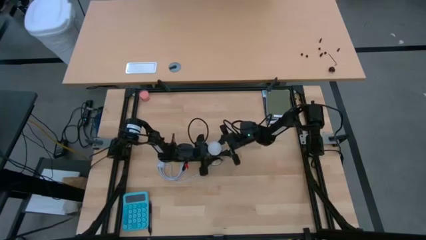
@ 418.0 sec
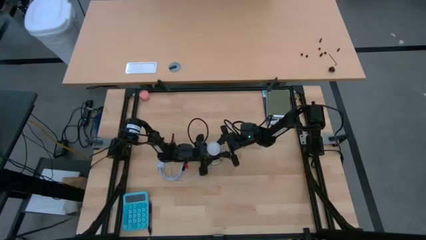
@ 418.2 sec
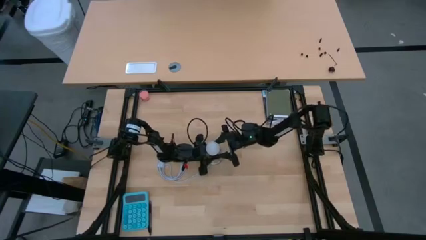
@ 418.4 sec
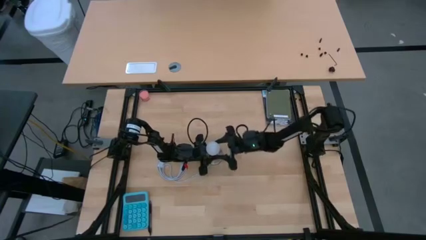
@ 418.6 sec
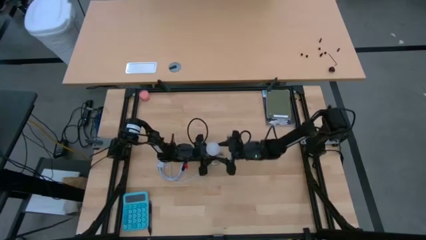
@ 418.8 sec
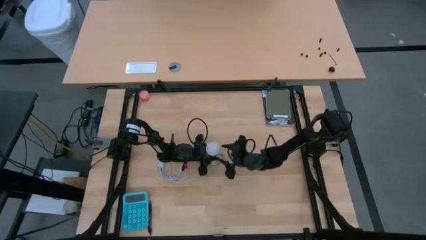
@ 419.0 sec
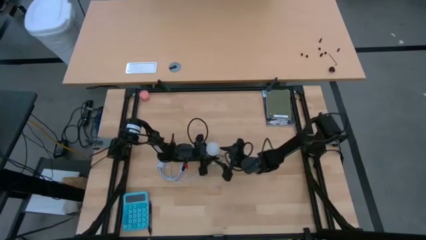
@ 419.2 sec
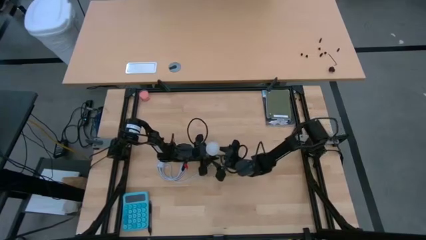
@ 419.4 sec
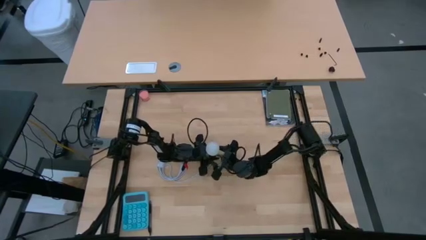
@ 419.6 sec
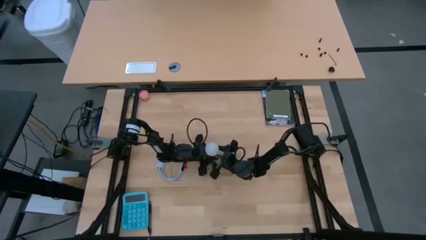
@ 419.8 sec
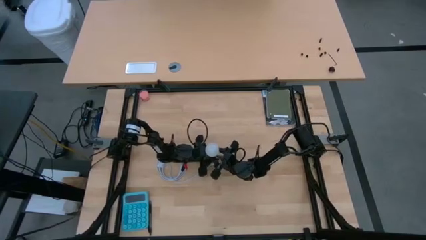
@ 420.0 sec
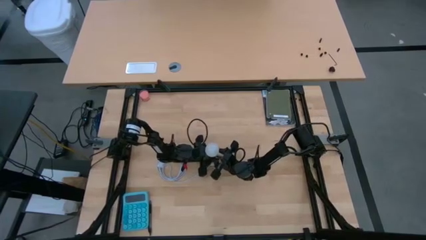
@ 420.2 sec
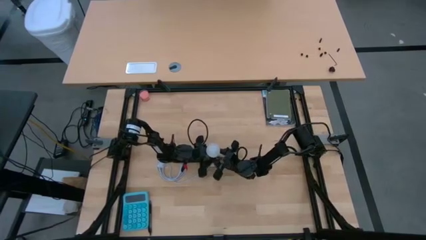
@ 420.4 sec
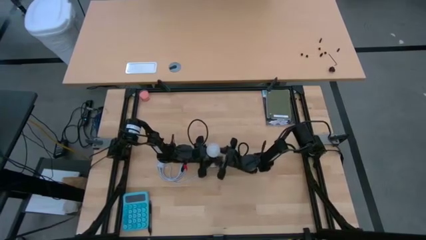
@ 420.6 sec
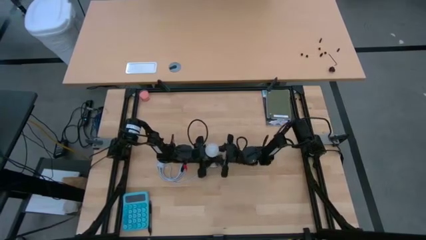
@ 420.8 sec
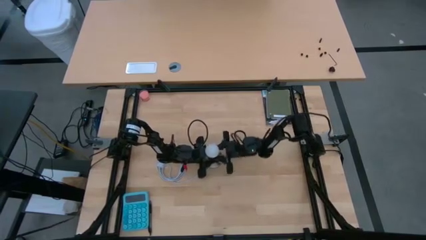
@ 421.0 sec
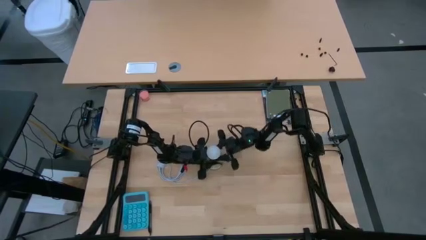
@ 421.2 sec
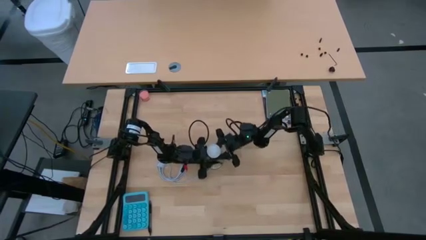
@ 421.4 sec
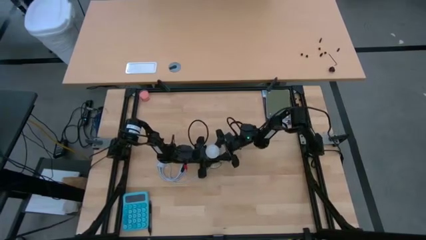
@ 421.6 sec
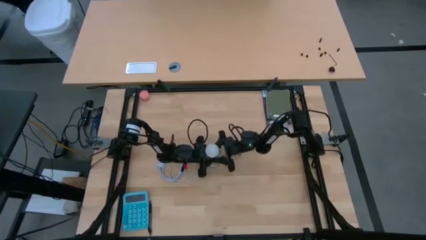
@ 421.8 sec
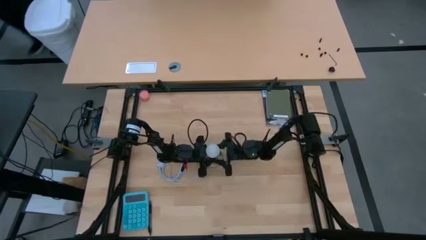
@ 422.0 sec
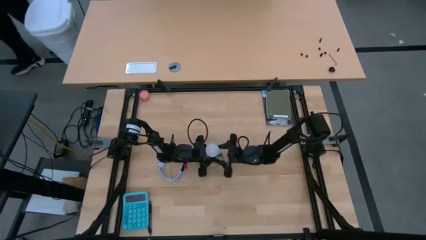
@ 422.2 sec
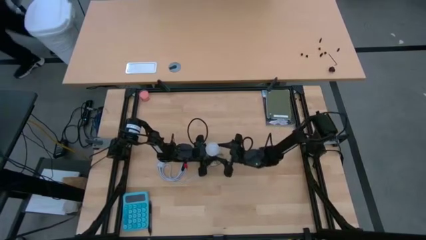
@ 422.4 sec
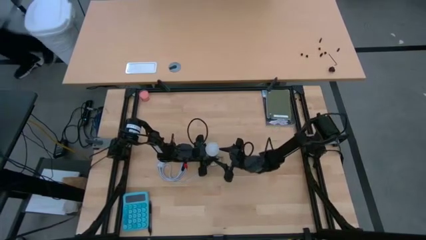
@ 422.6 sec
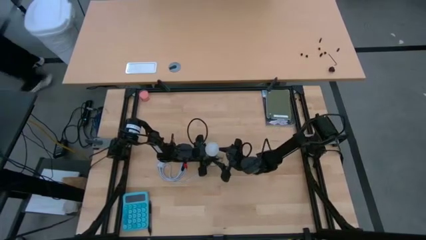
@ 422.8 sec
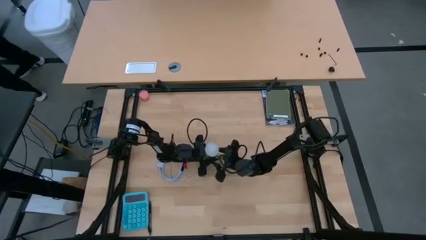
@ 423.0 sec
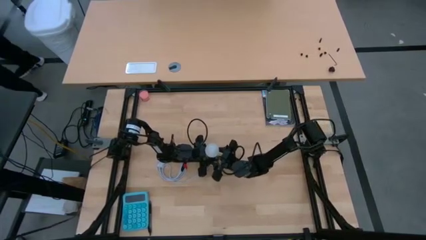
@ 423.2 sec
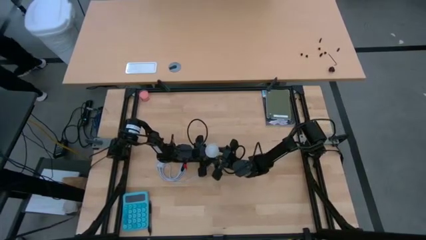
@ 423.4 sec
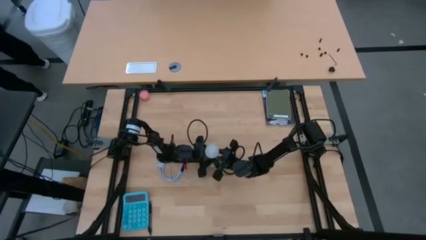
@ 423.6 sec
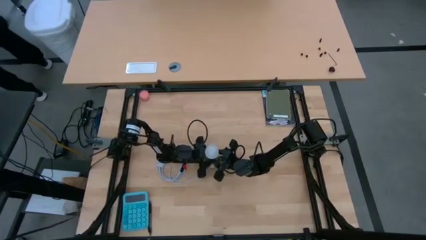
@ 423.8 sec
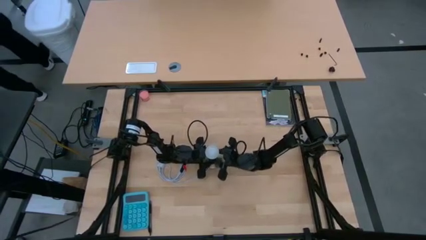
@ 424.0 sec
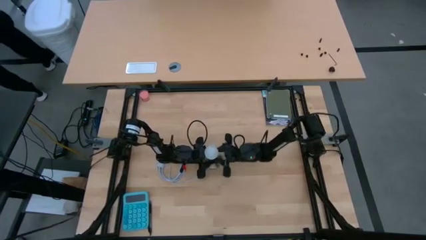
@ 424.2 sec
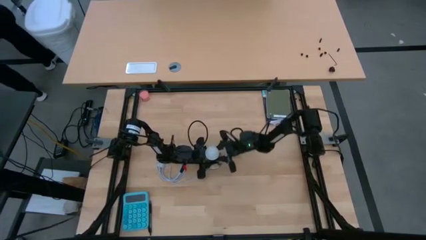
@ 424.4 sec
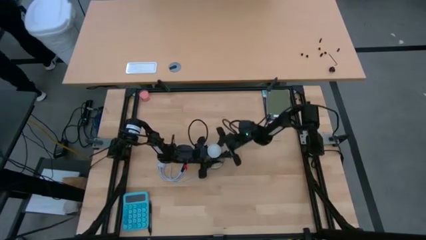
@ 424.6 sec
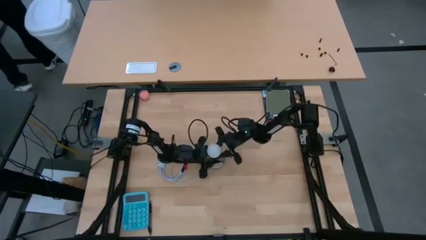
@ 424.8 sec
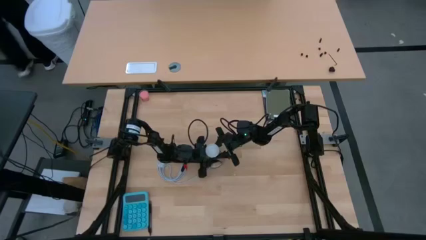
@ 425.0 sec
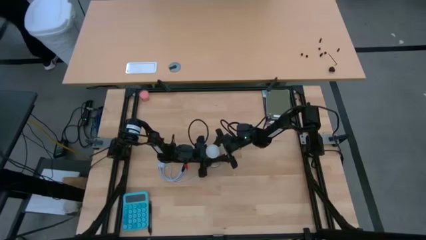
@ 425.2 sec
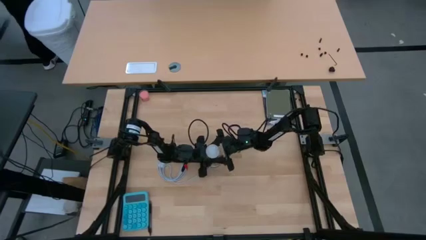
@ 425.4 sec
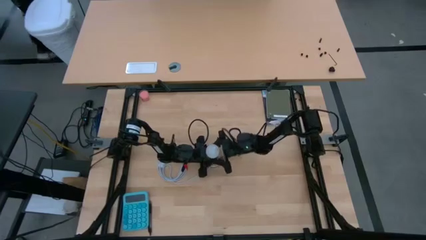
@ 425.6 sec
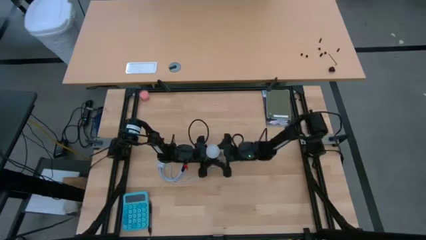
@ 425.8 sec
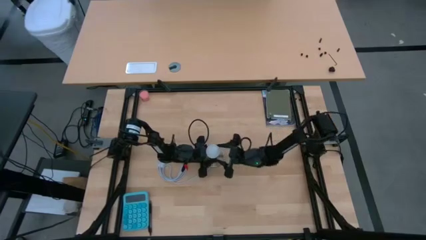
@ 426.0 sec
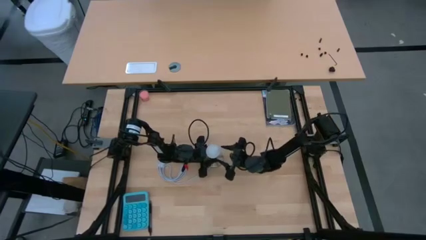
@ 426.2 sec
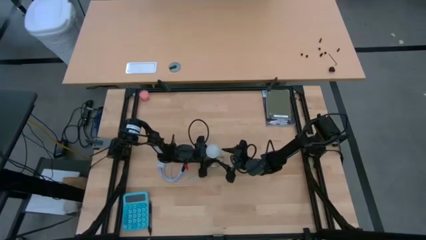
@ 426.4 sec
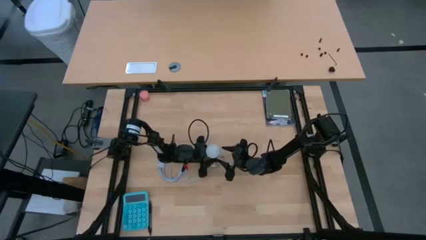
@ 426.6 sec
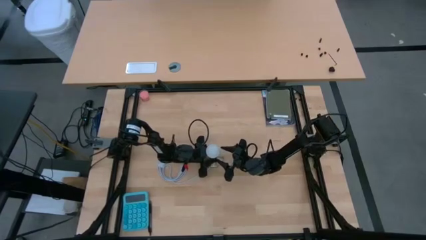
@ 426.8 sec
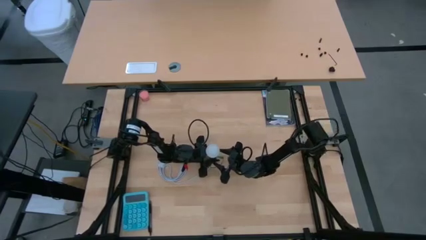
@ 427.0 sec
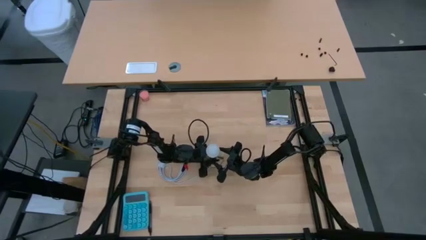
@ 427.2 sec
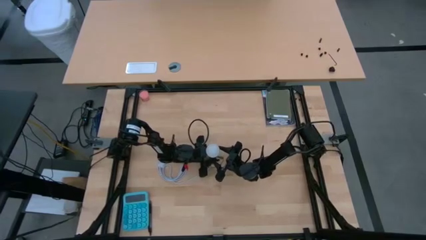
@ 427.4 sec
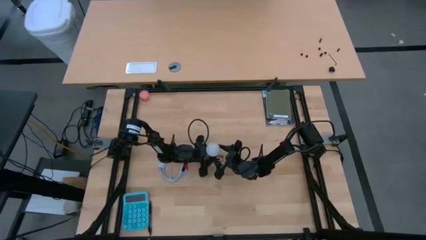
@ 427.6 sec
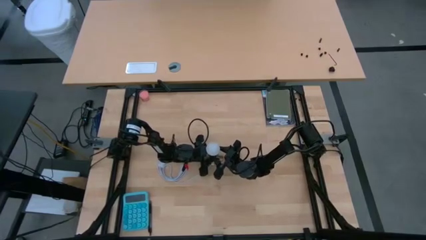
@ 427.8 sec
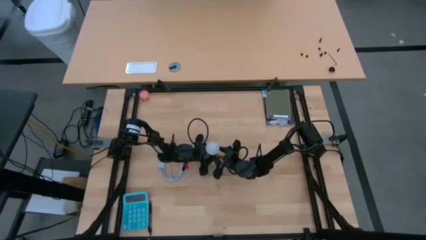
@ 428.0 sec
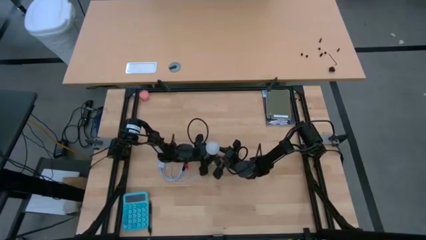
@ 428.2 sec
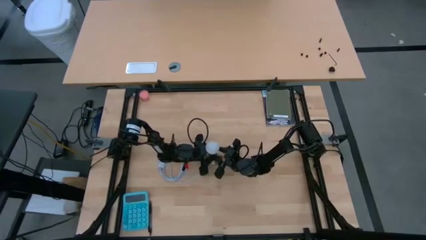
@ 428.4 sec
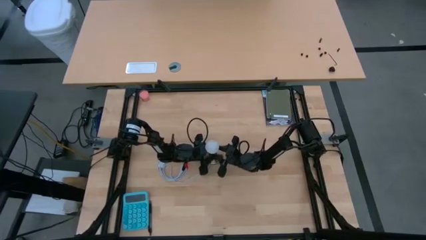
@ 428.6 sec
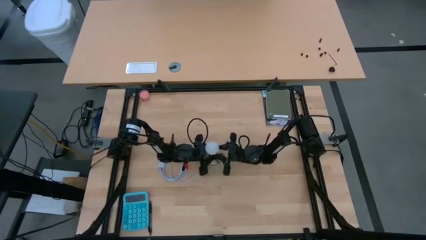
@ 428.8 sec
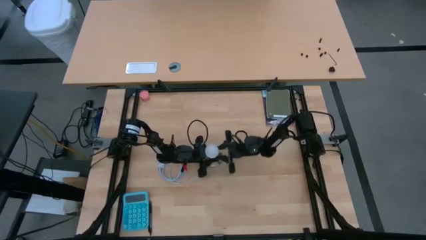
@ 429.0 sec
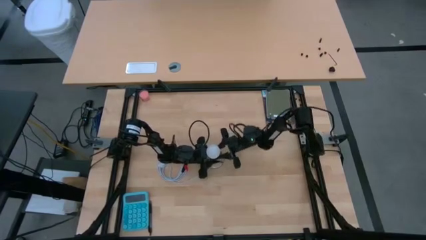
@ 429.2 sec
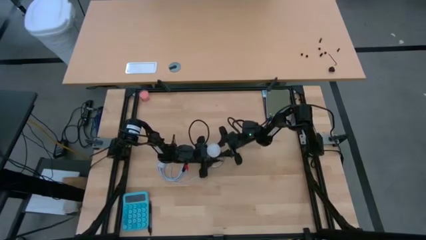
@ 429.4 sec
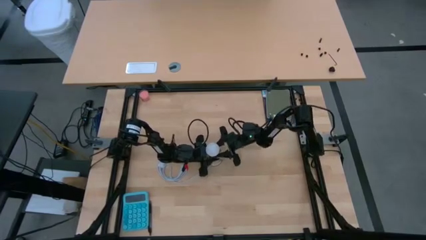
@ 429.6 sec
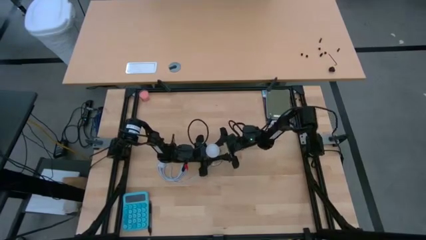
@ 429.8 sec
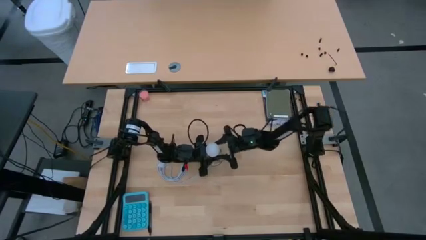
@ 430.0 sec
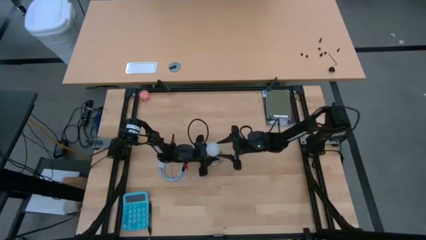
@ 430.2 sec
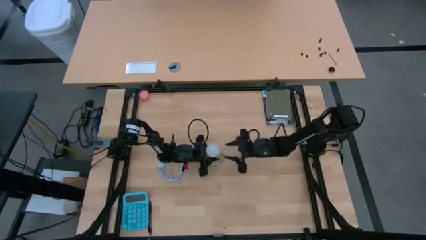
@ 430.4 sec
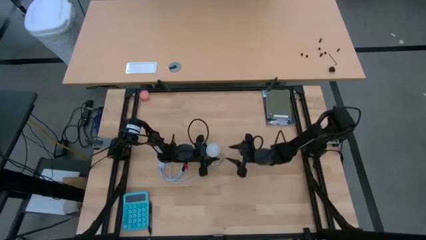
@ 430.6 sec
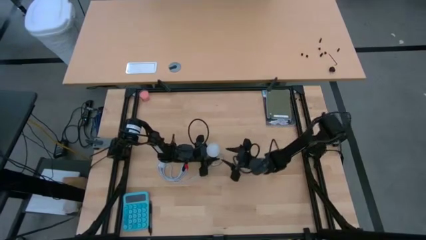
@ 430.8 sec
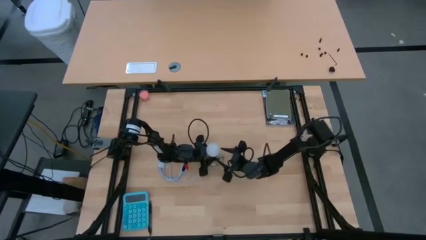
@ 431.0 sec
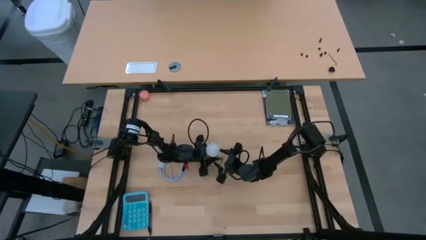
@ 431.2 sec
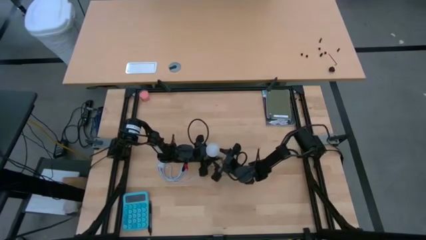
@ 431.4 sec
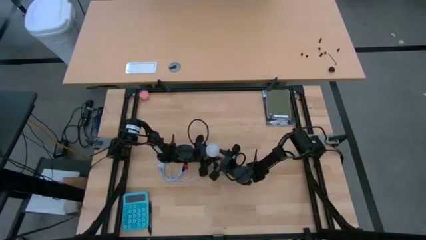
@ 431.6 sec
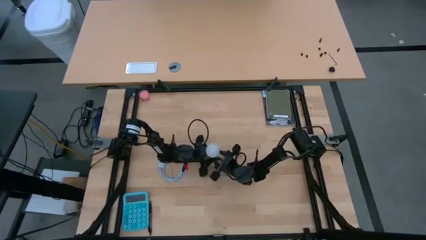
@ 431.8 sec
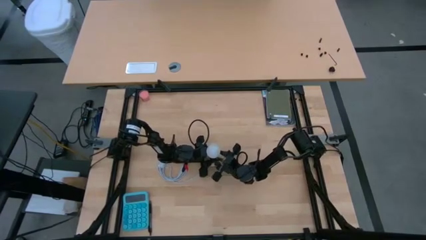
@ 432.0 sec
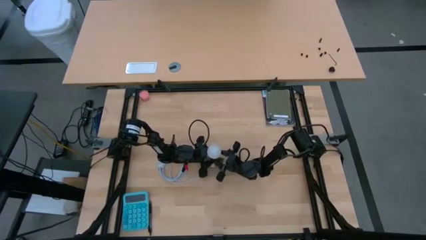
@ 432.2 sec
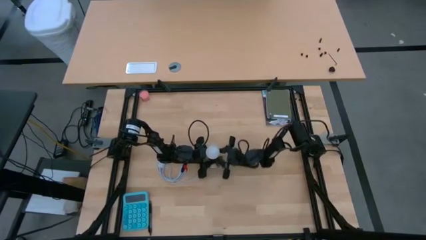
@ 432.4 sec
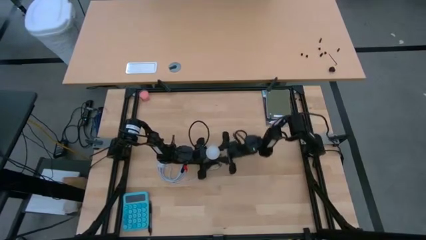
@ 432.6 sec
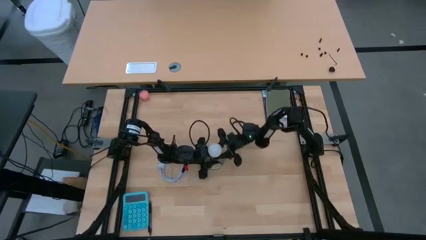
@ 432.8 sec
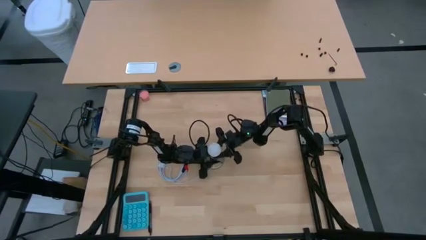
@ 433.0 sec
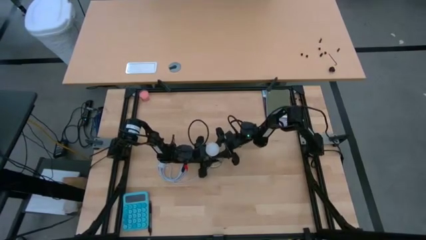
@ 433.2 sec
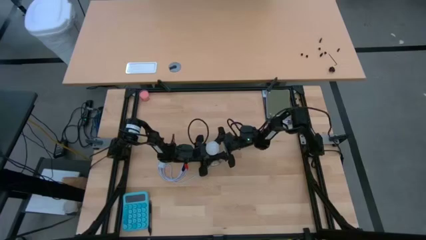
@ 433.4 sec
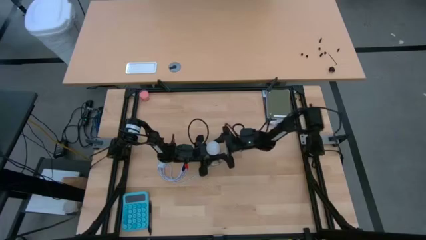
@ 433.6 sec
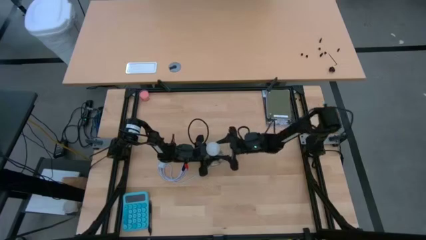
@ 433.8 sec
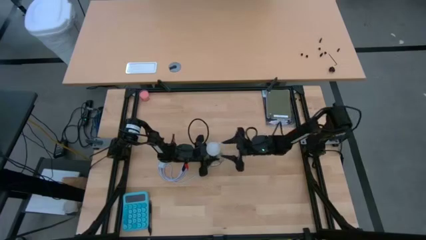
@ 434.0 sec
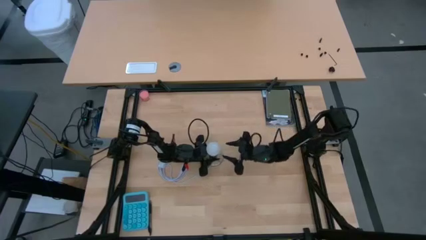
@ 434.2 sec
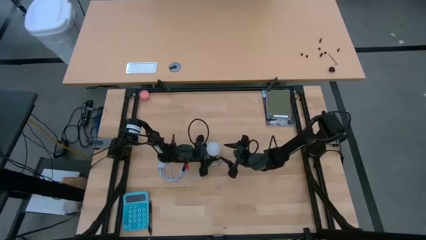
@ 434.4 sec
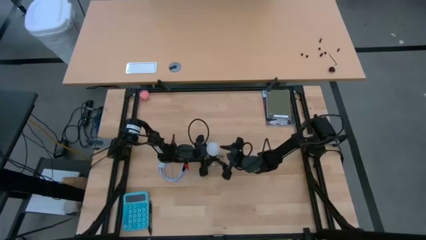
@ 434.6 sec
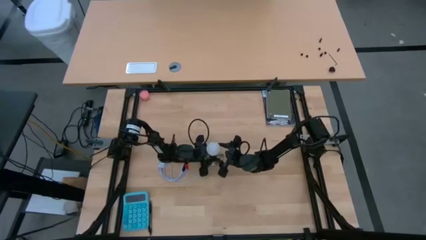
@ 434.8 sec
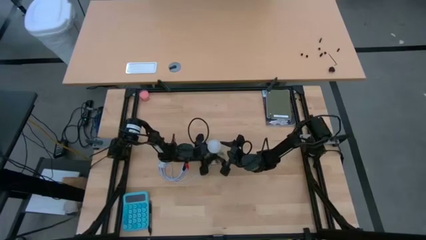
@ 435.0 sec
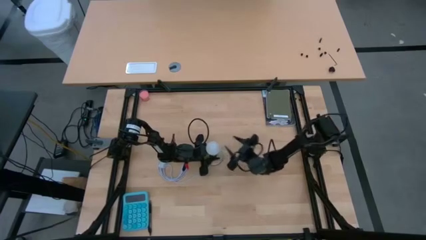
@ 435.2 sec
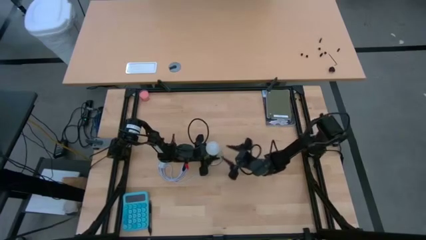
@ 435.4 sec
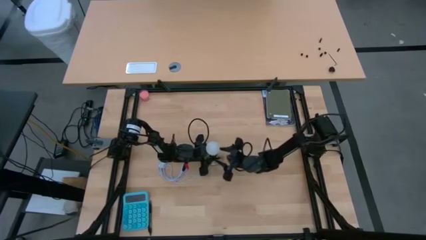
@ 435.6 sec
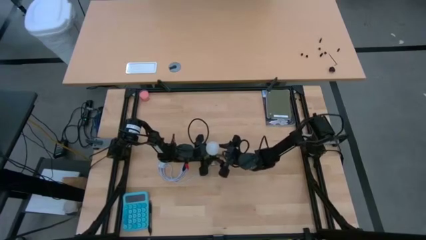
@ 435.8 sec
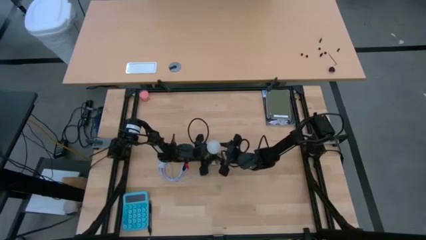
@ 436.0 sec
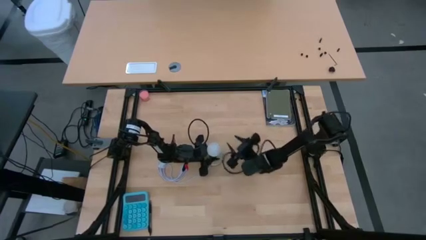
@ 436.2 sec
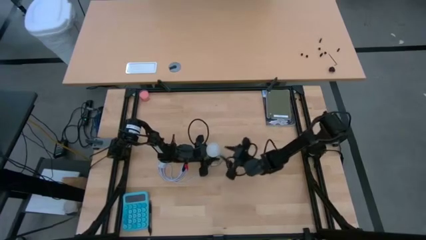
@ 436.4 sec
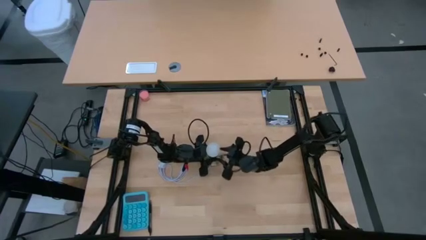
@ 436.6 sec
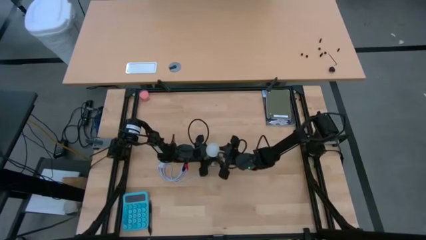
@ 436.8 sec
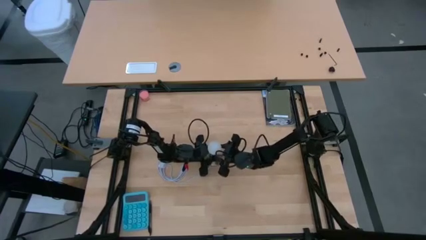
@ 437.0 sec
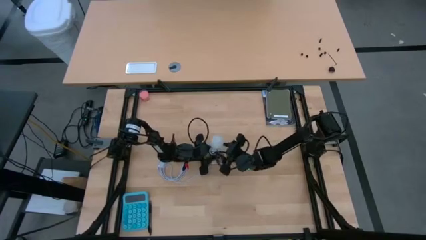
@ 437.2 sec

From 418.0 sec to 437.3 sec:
Task: Screw lightbulb
Remove the lightbulb from the lamp
